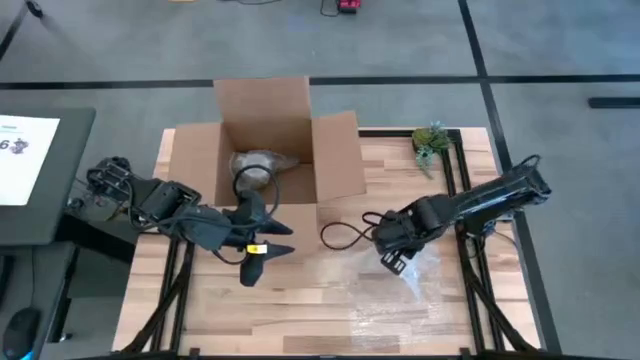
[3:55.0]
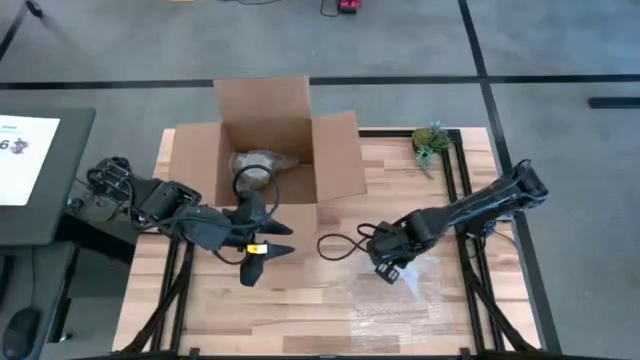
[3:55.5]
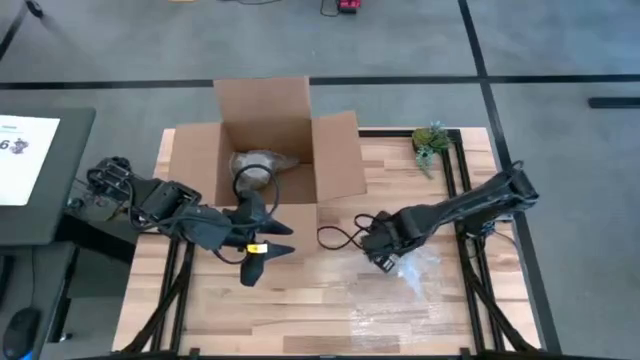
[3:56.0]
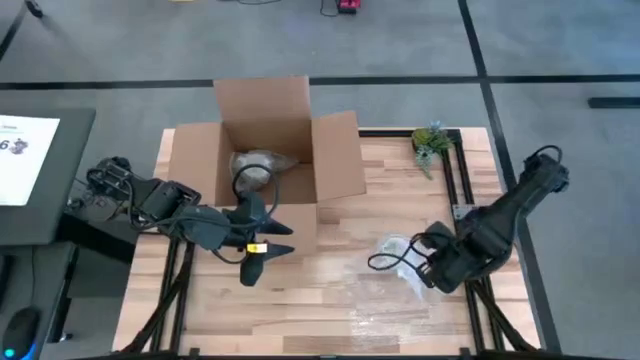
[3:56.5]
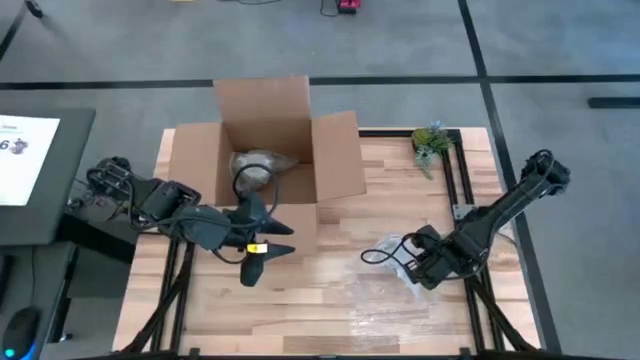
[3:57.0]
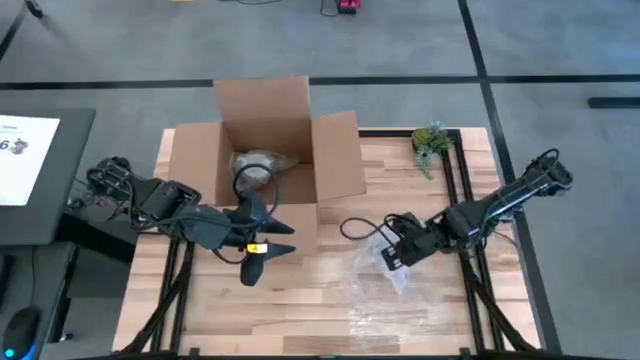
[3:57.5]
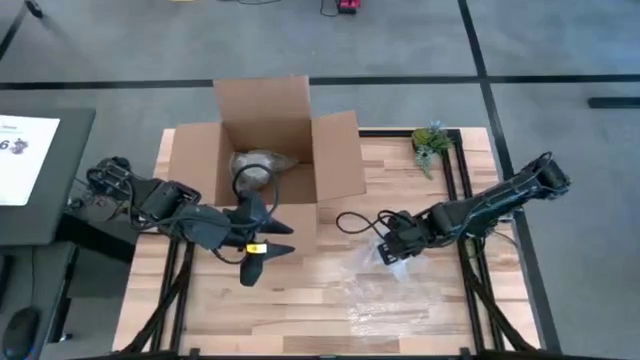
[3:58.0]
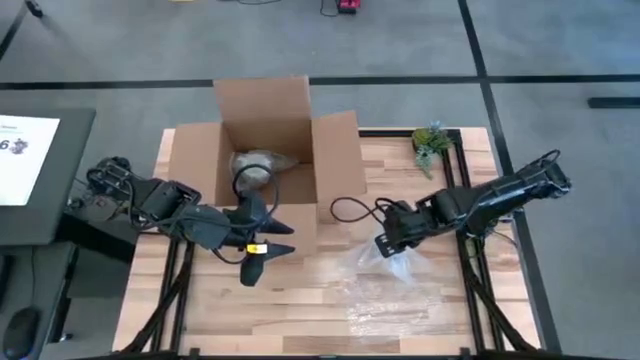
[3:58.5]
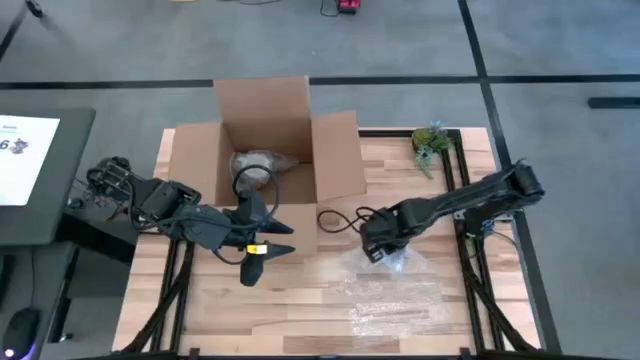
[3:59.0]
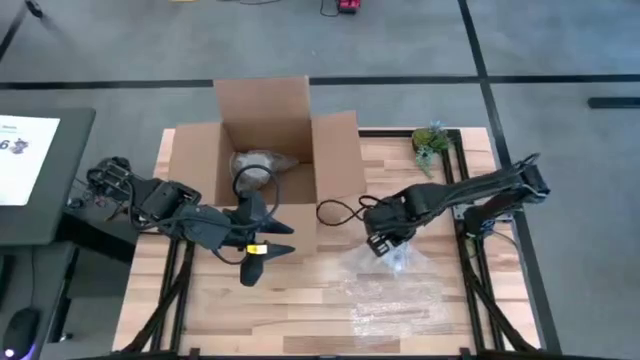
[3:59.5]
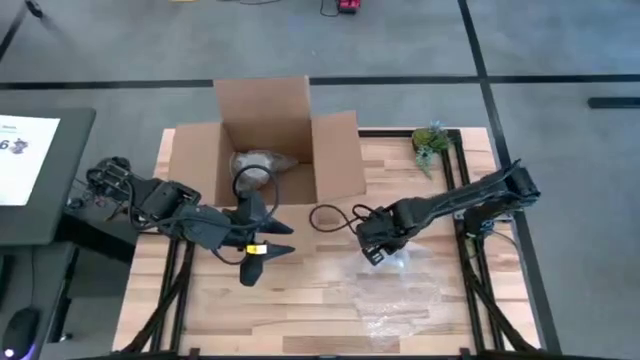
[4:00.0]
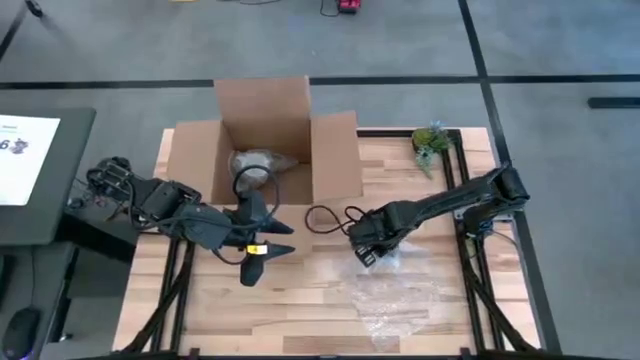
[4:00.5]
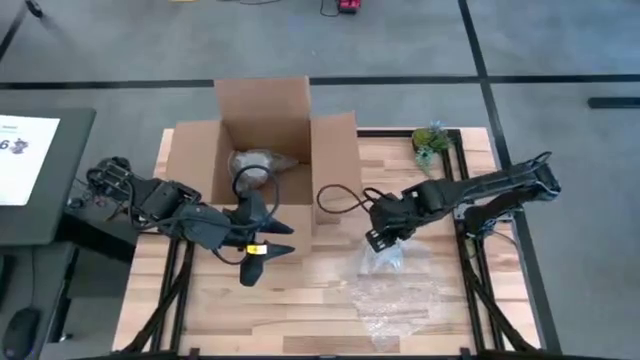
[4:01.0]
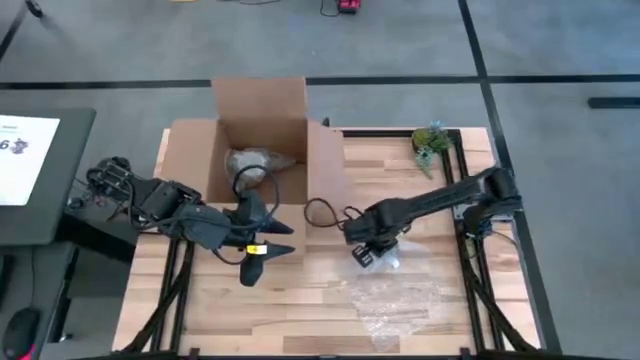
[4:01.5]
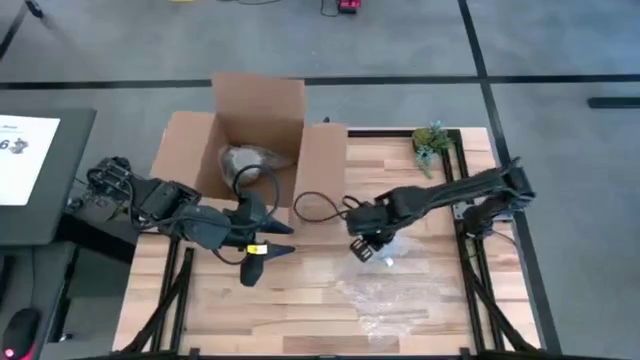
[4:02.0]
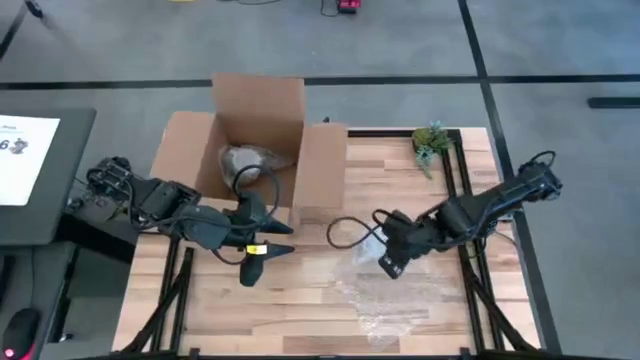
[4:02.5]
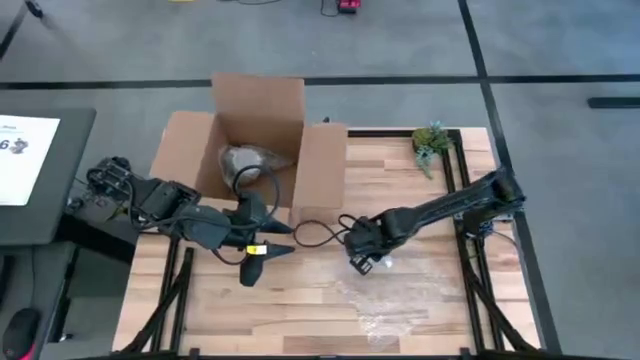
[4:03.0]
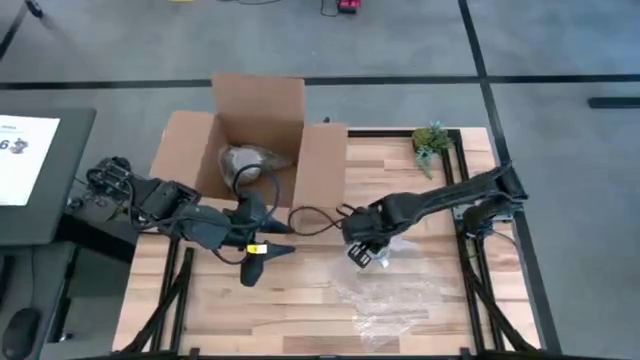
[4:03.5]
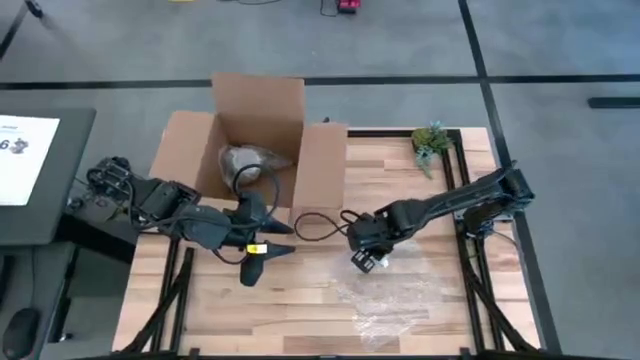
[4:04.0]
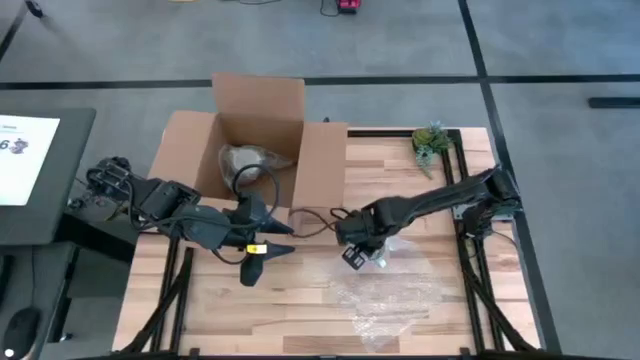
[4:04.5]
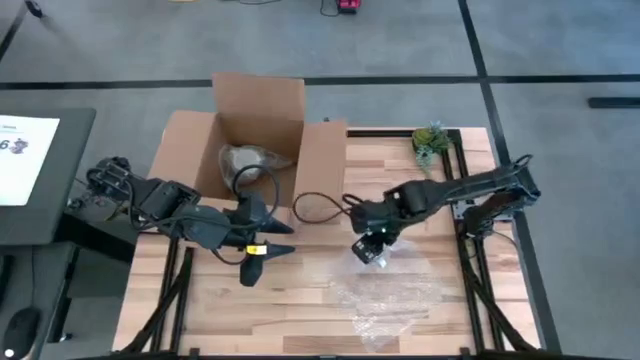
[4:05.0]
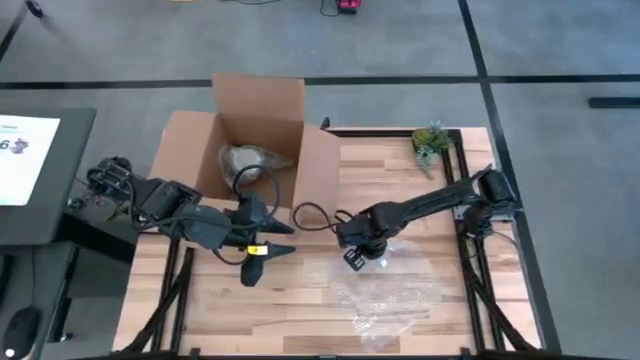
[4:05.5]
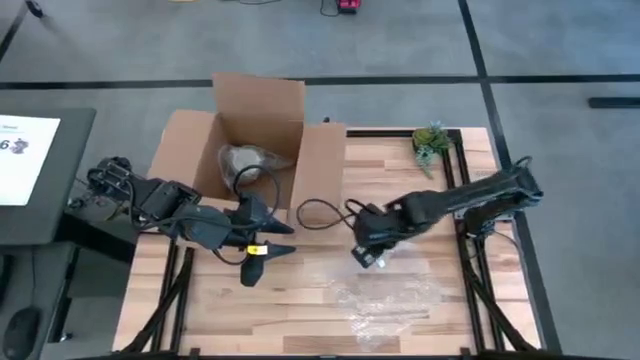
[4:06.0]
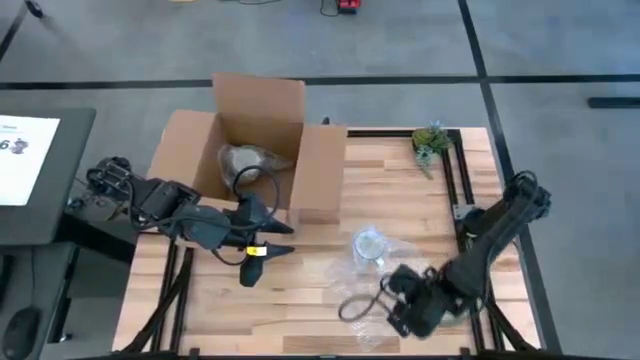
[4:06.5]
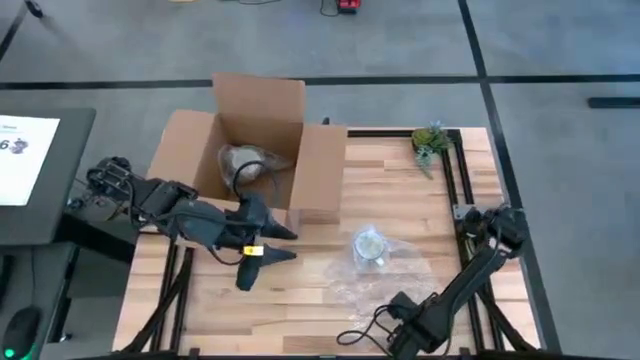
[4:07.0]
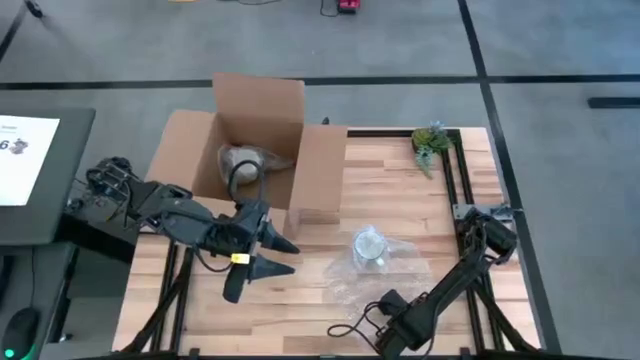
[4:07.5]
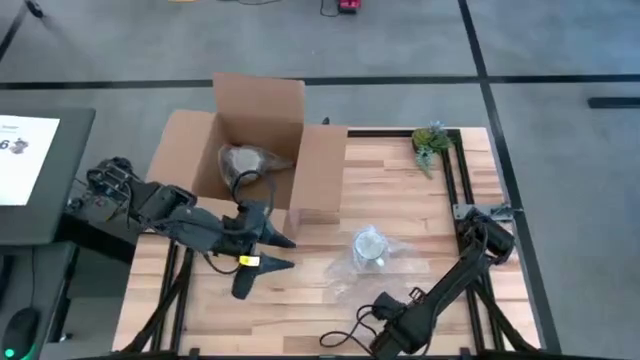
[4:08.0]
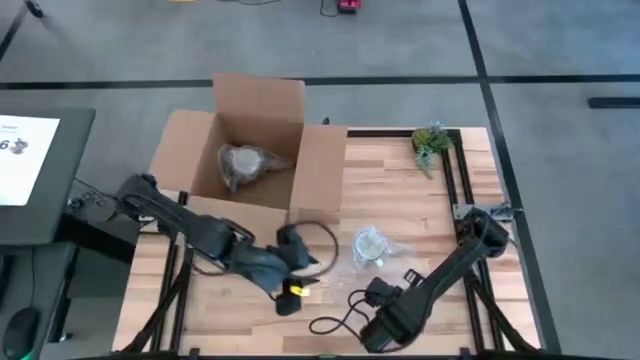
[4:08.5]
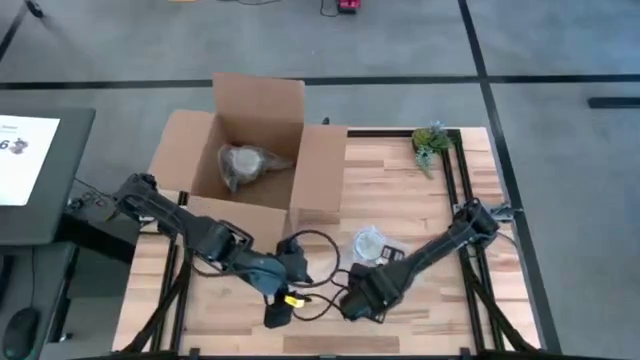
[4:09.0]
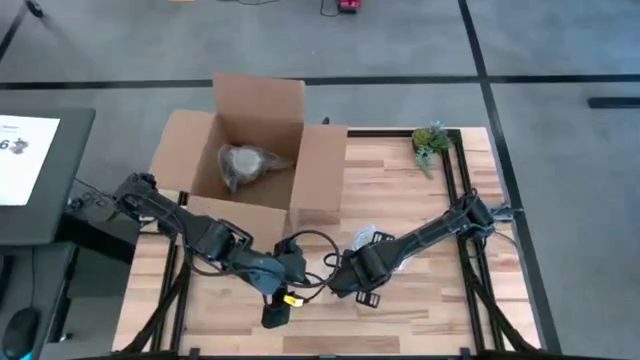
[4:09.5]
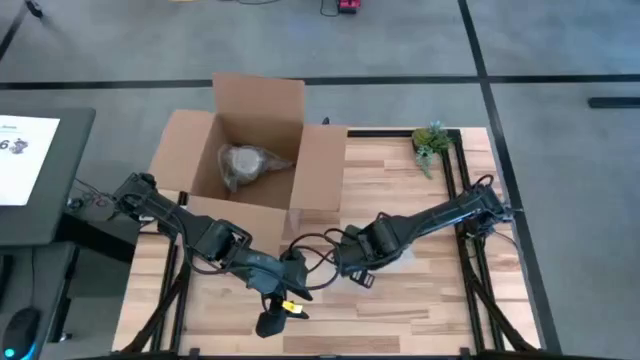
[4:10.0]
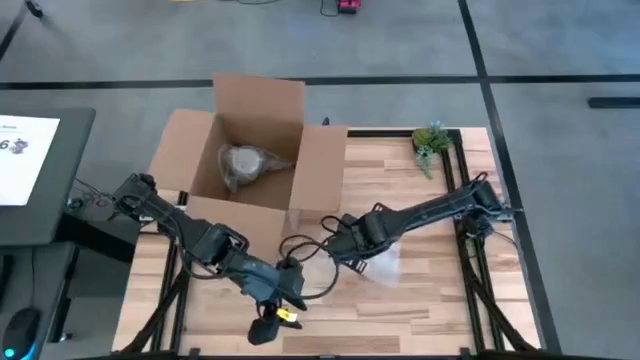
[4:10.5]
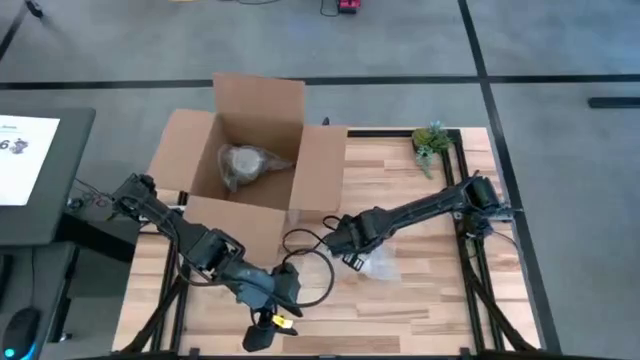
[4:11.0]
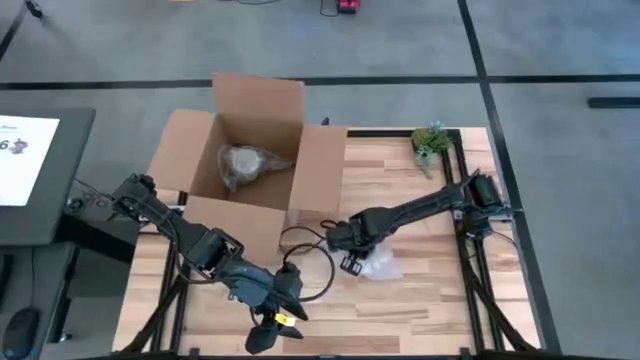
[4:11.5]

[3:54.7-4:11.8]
Task: wrap mug
Wrap the blue patterned mug with the bubble wrap

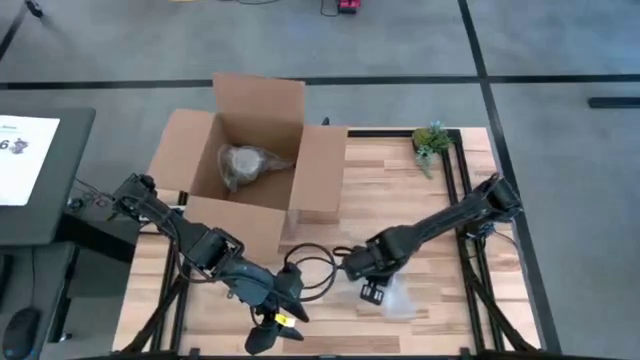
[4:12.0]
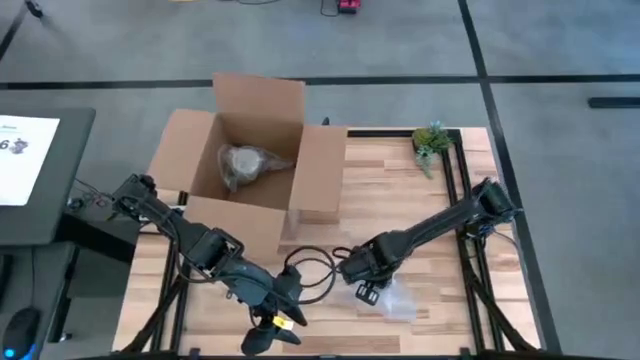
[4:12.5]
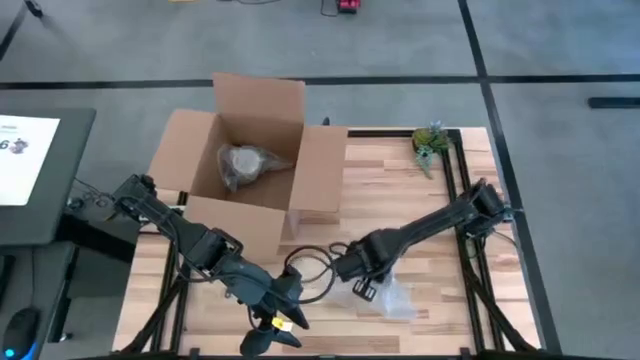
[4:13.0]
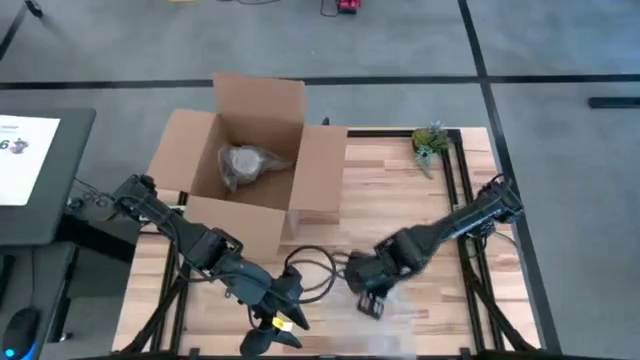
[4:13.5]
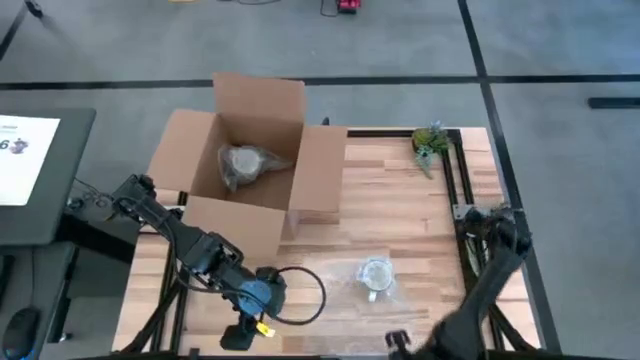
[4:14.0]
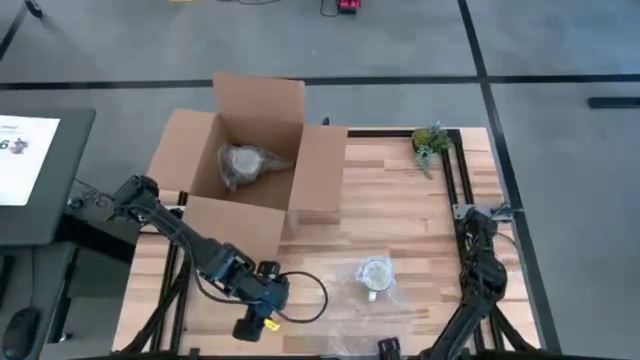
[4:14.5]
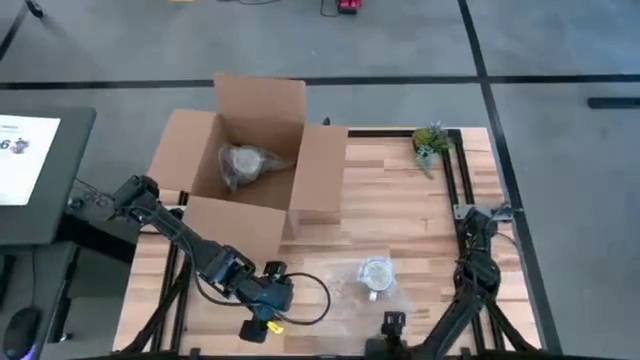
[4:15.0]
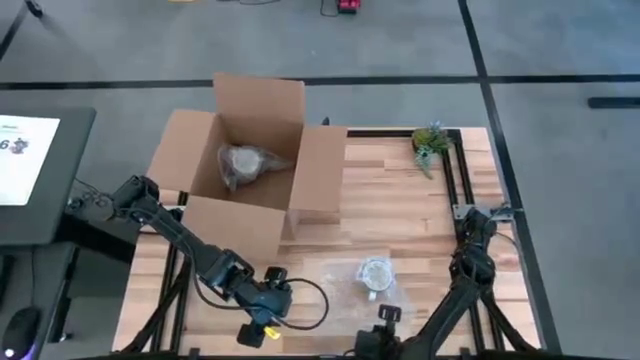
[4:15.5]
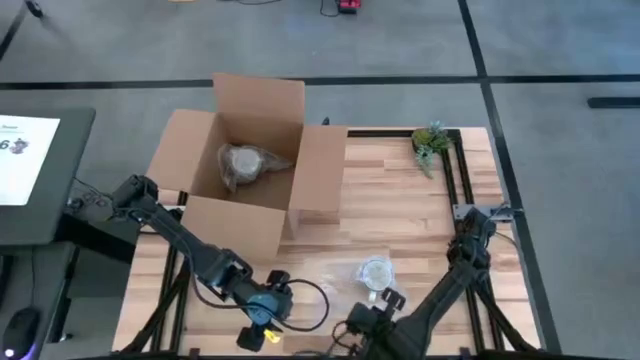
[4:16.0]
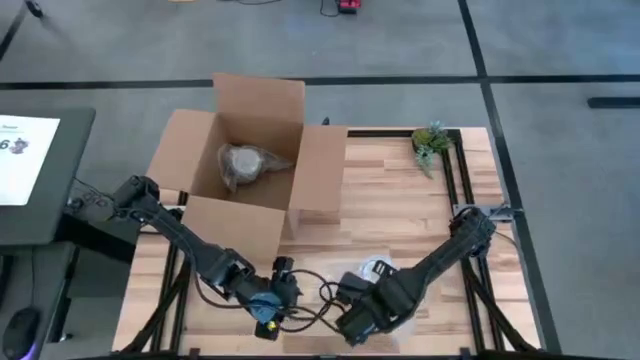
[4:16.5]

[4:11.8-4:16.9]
Wrap the blue patterned mug with the bubble wrap
